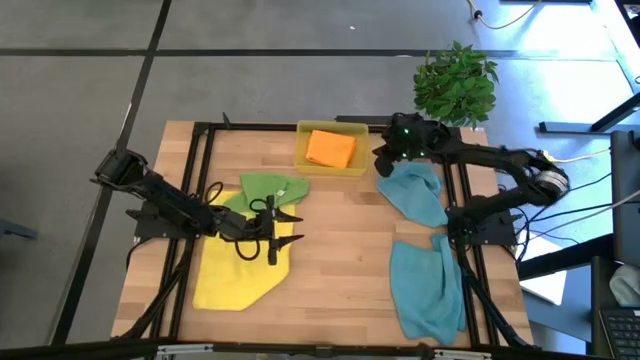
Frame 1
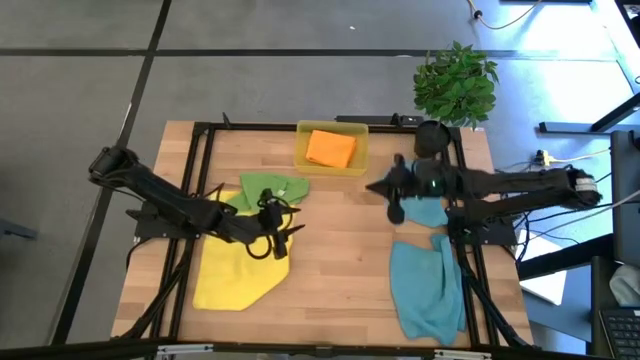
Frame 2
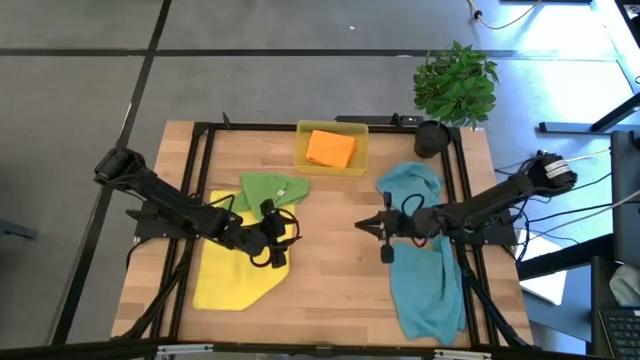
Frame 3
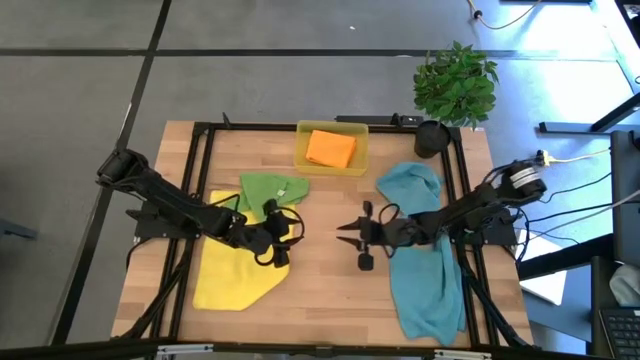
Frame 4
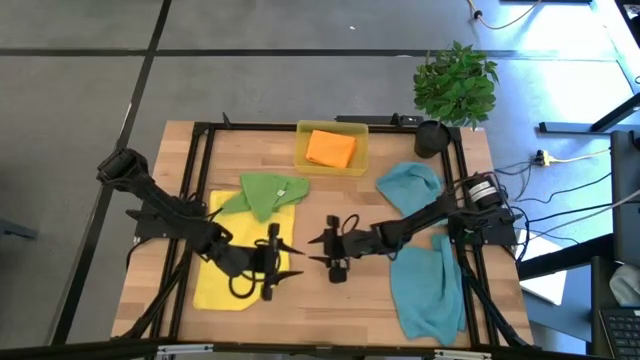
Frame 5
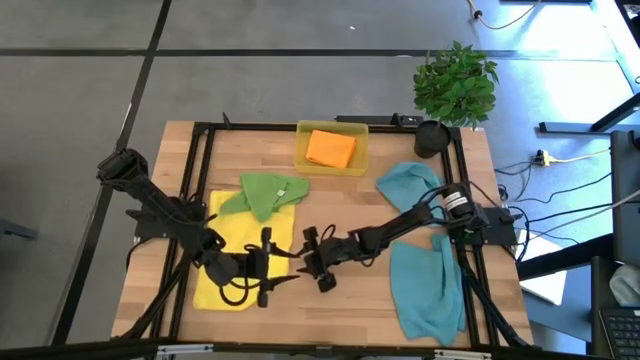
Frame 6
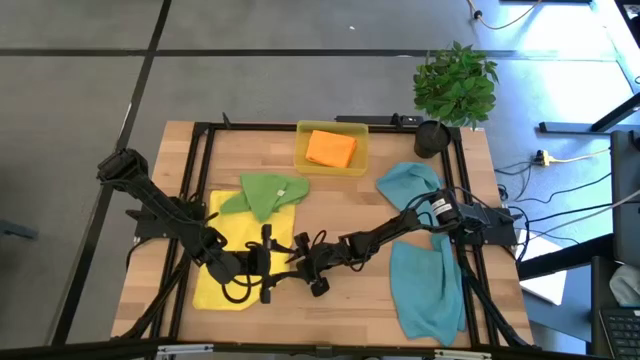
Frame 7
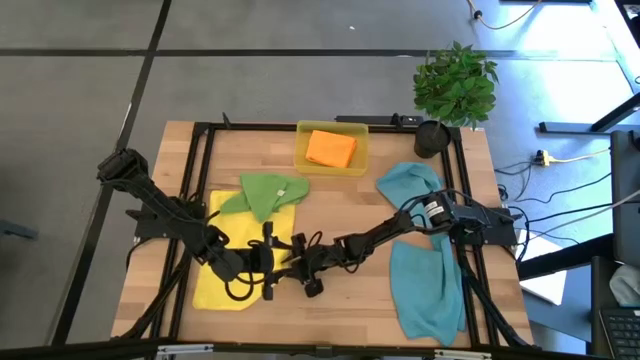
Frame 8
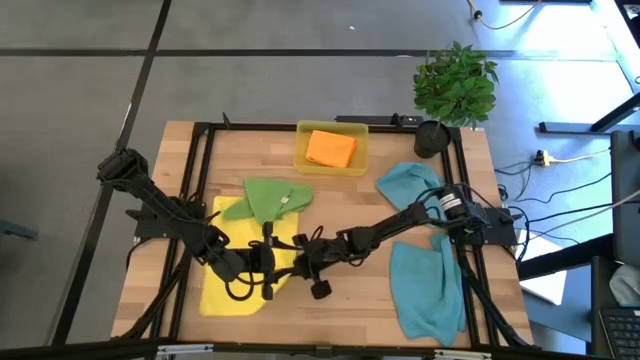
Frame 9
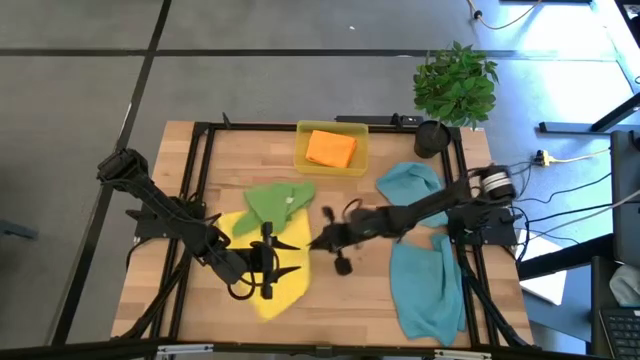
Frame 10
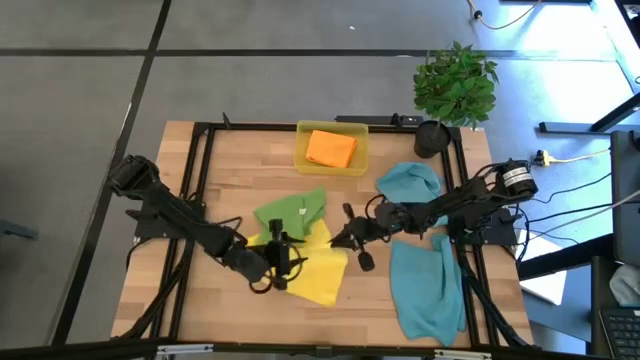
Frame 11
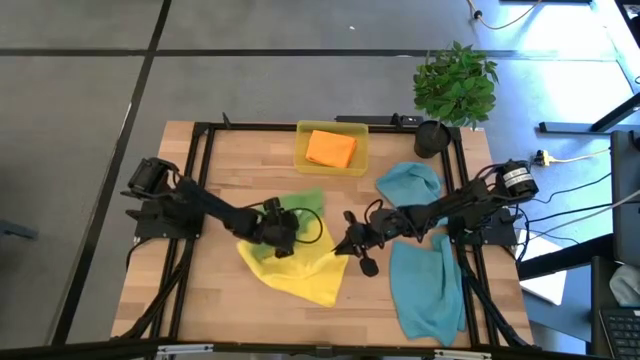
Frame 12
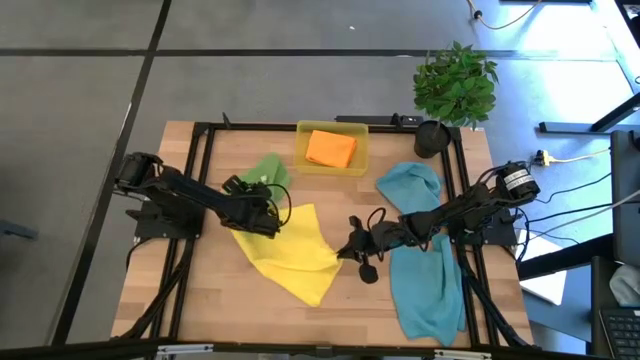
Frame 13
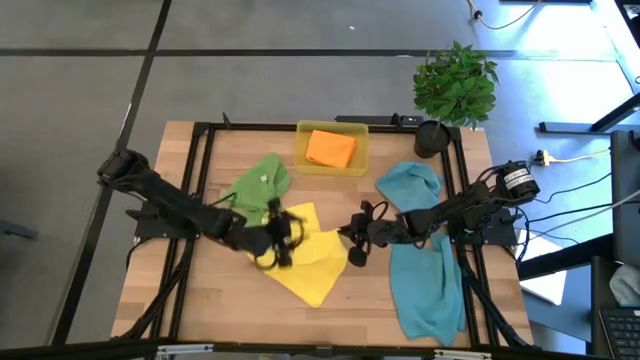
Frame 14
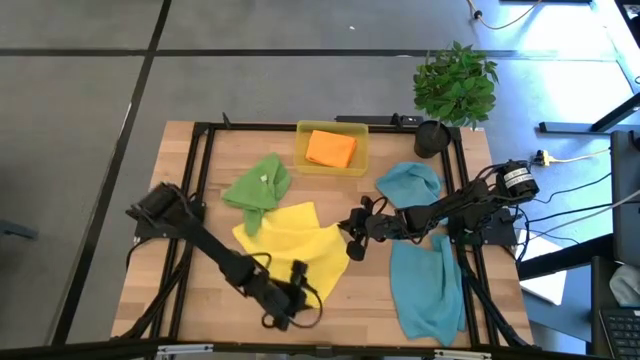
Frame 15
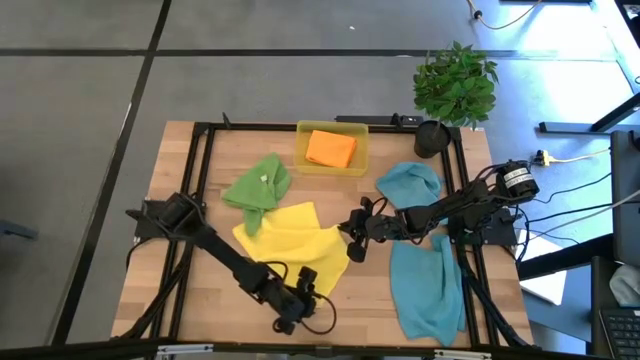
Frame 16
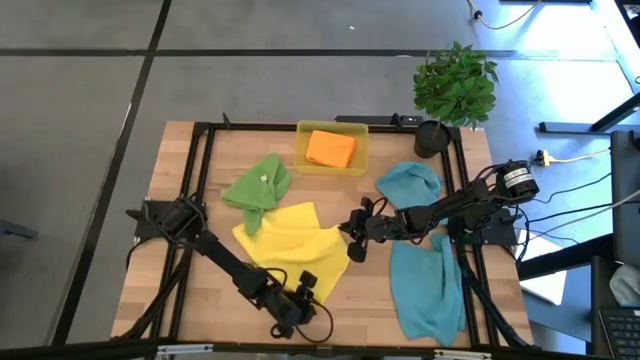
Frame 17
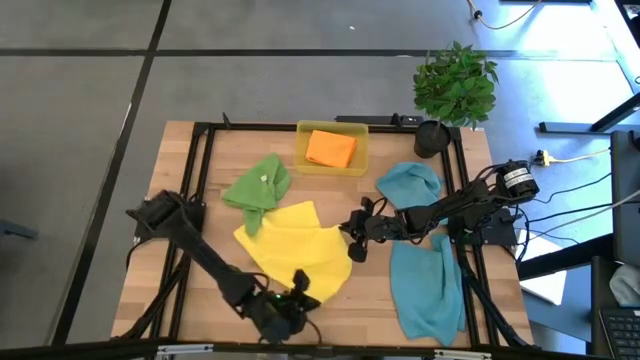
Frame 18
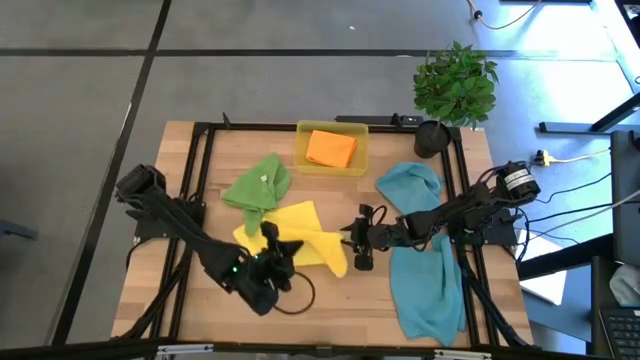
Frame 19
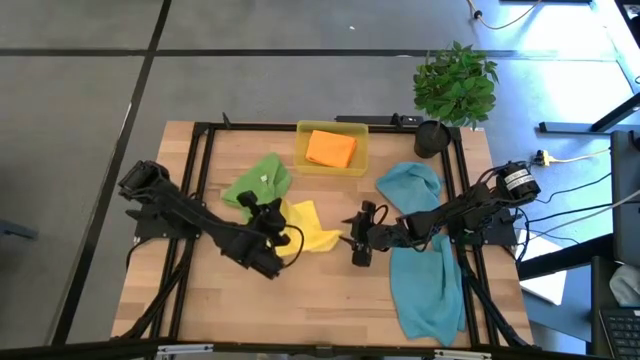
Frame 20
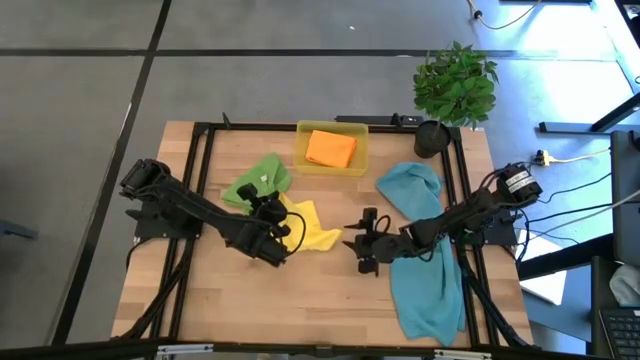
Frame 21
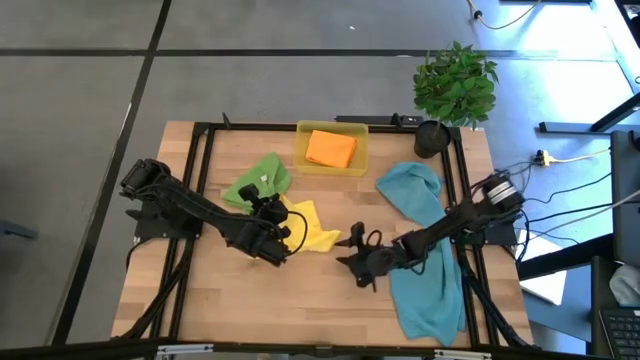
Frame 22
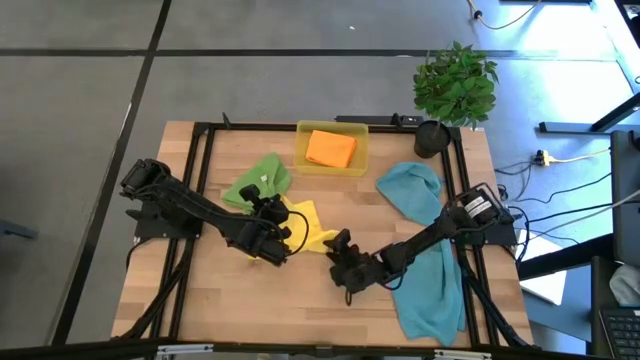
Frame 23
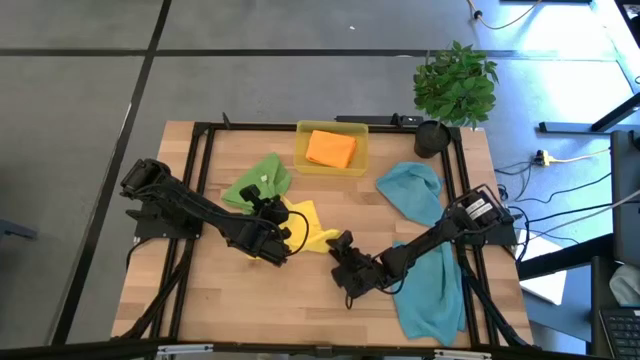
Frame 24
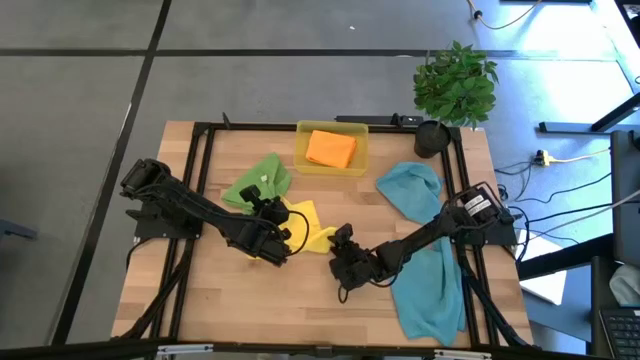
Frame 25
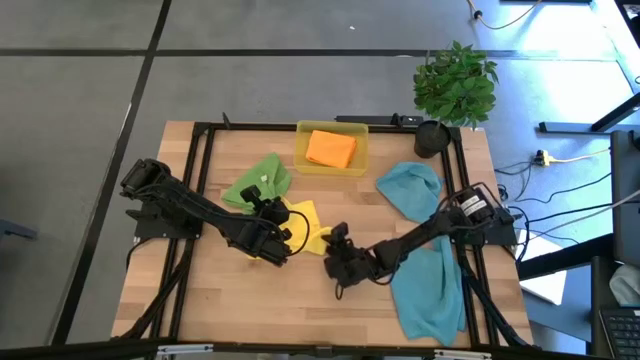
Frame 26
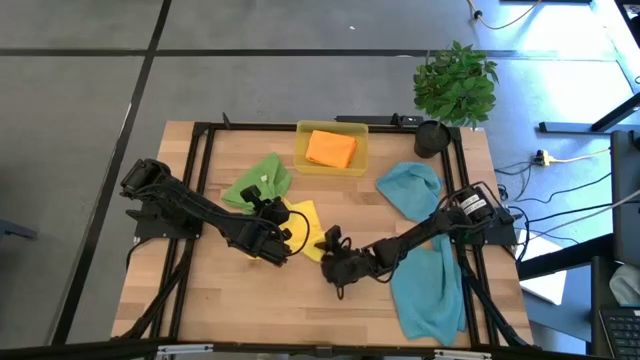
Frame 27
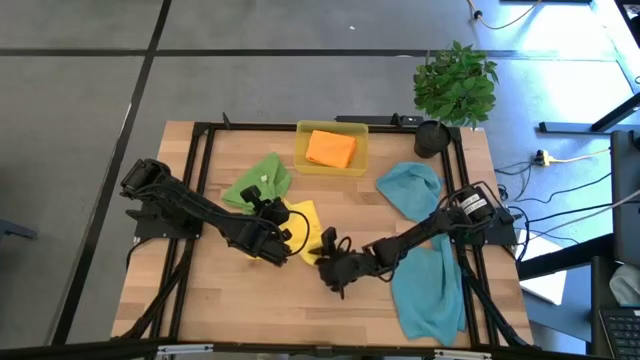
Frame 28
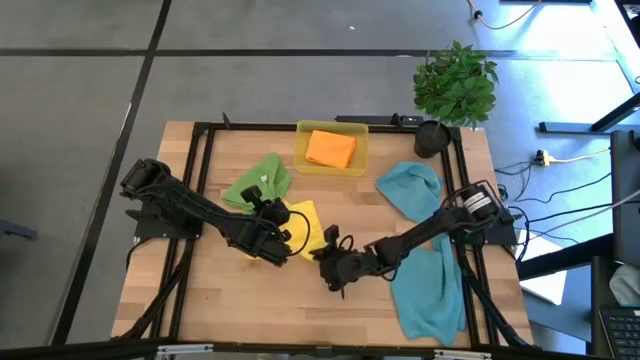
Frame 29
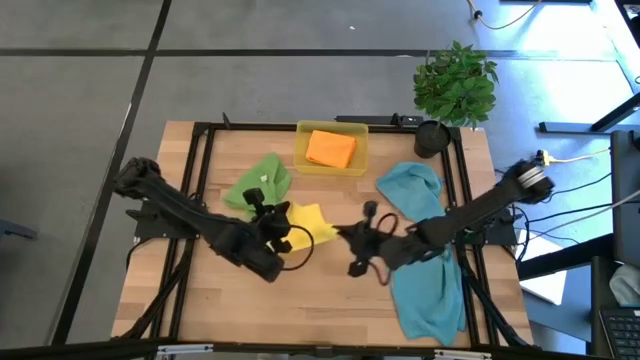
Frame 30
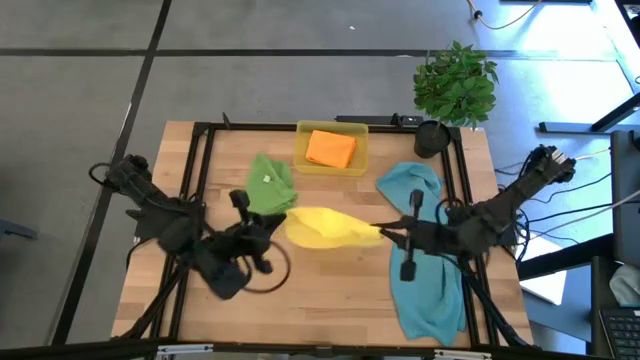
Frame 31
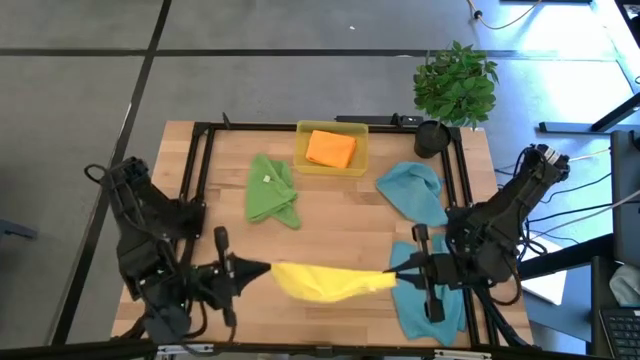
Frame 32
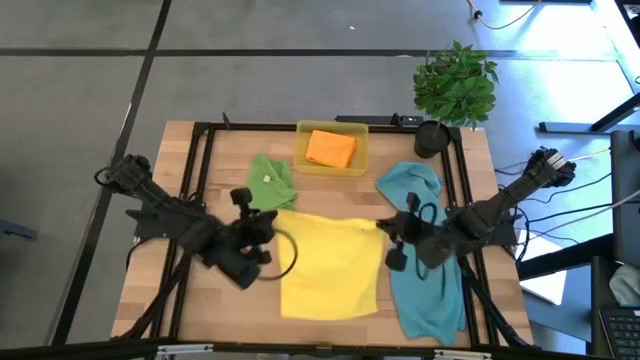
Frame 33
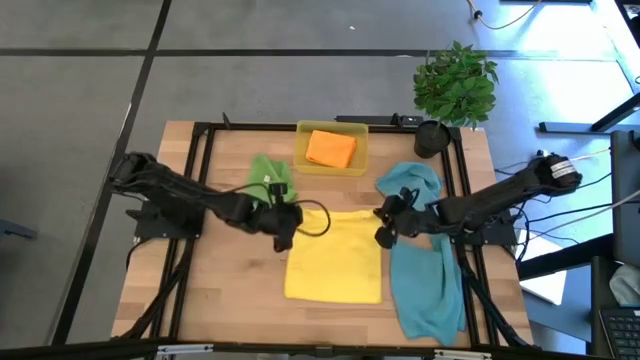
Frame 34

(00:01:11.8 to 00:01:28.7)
Task: Fold microfiber towels
Fold the yellow microfiber cloth

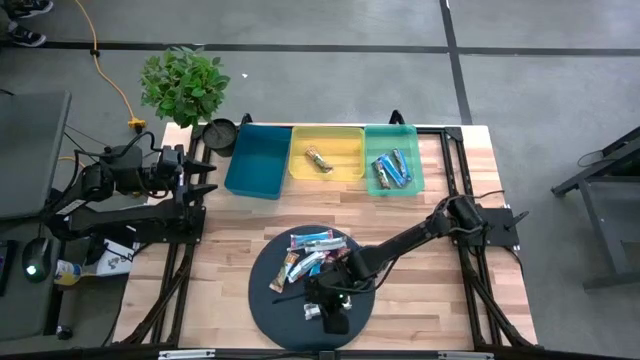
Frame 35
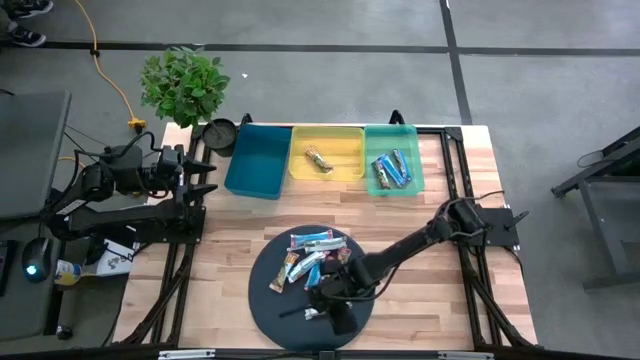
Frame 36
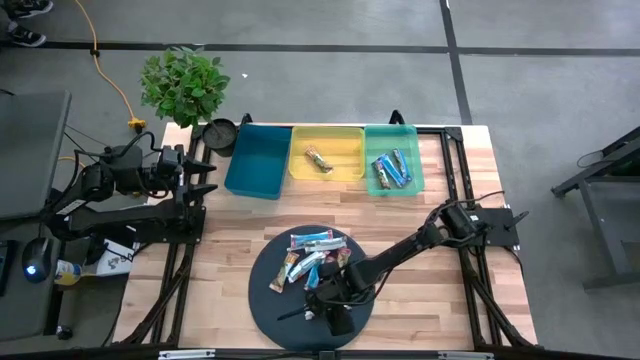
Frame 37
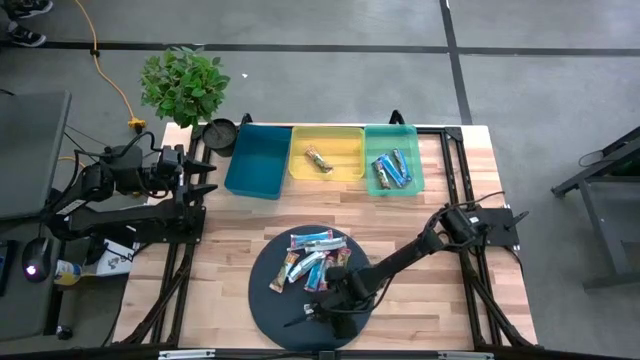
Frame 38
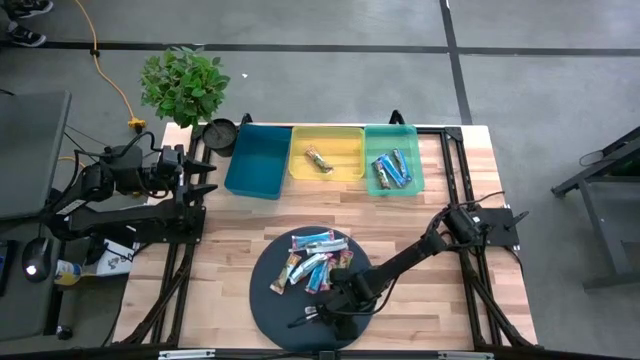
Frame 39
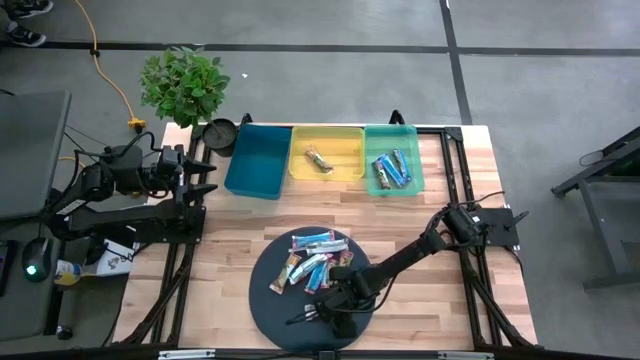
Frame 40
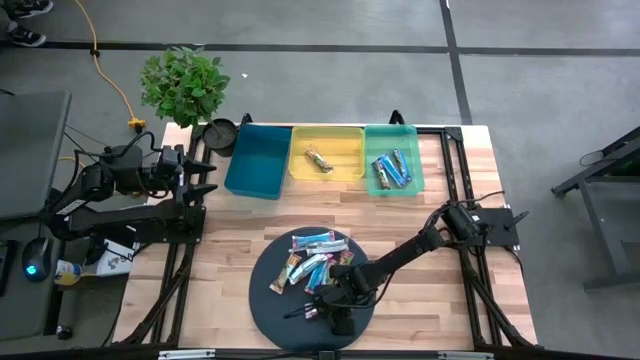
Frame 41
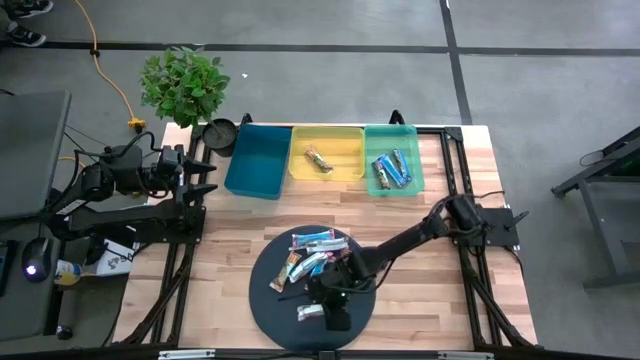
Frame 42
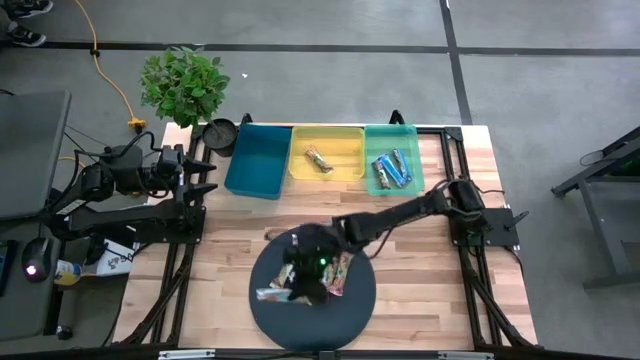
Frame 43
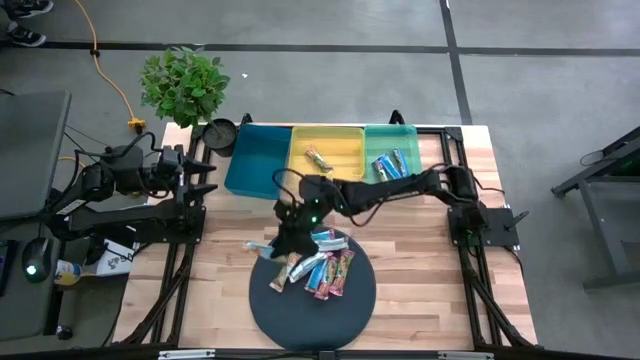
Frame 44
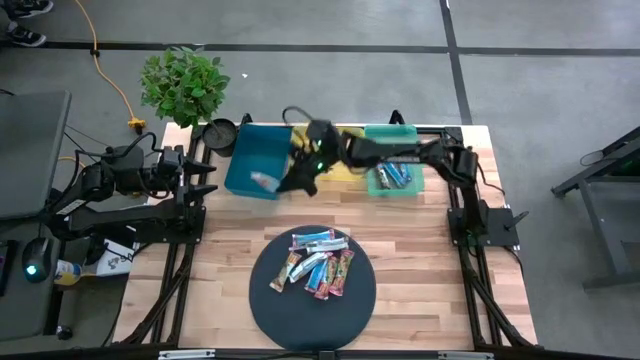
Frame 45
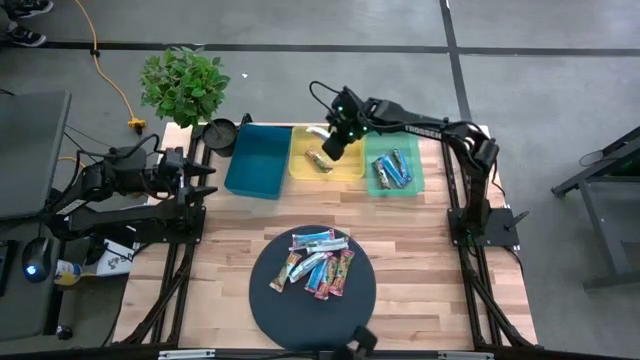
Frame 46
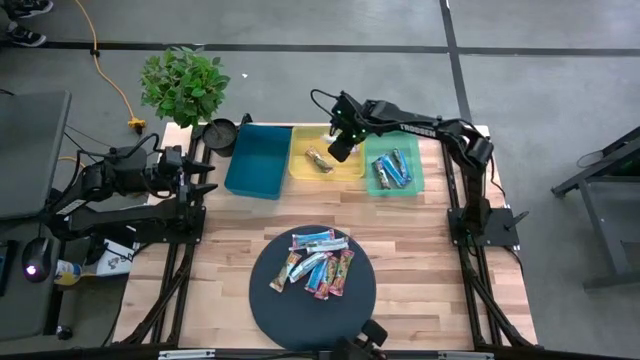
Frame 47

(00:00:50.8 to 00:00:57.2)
Task: Pick and place Granola Bars by type
Put the yellow granola bar into the yellow bin
